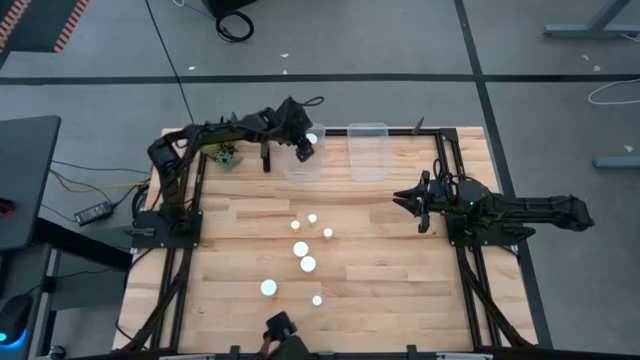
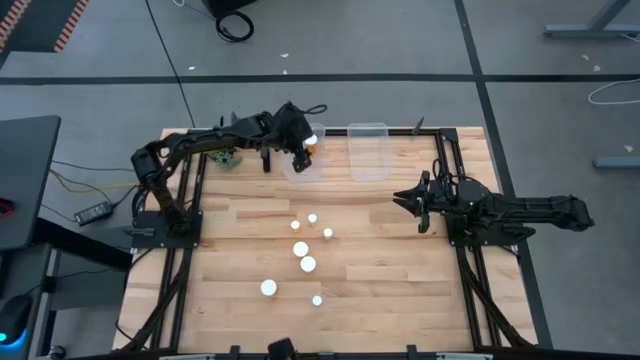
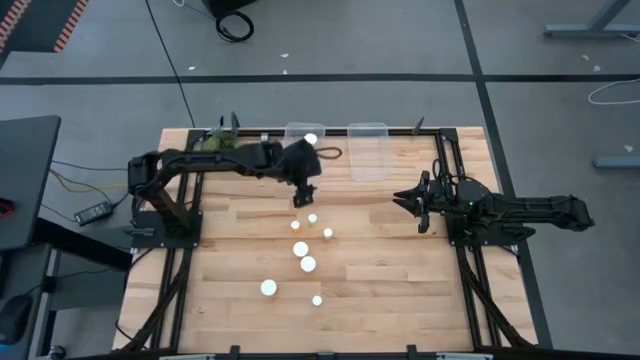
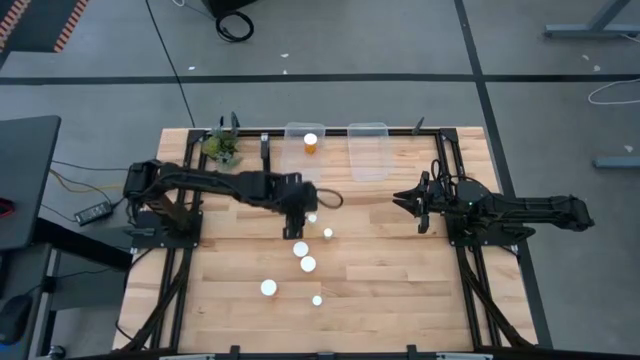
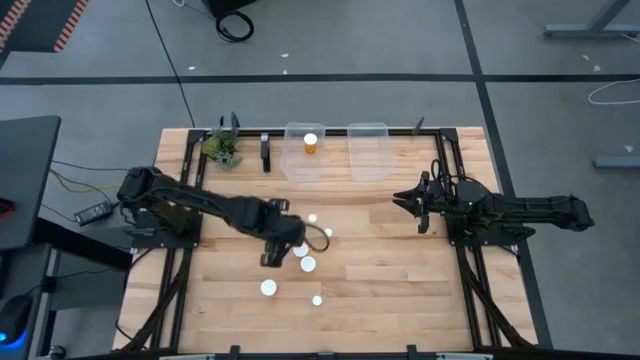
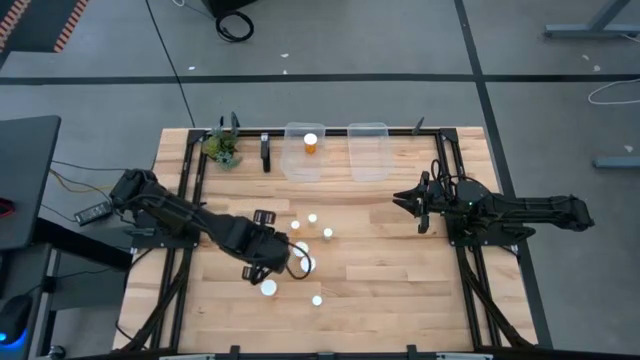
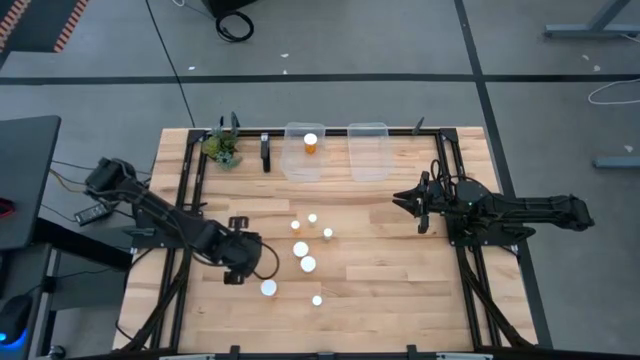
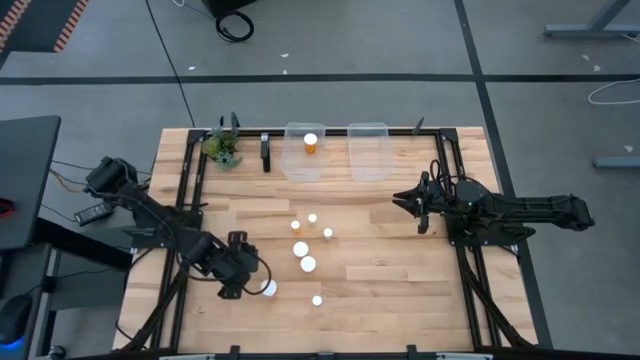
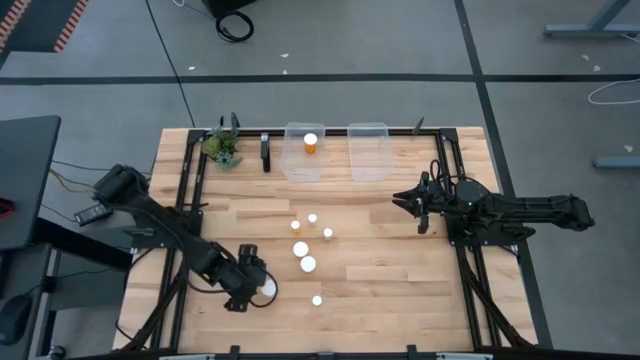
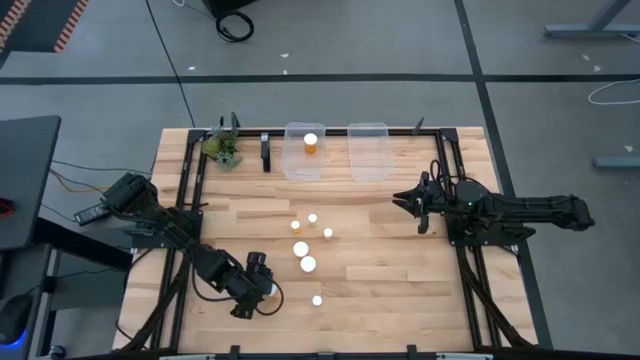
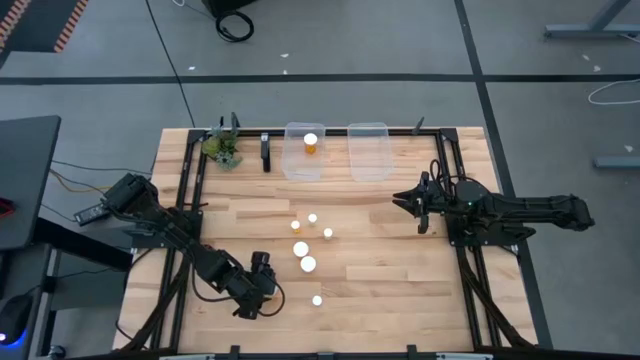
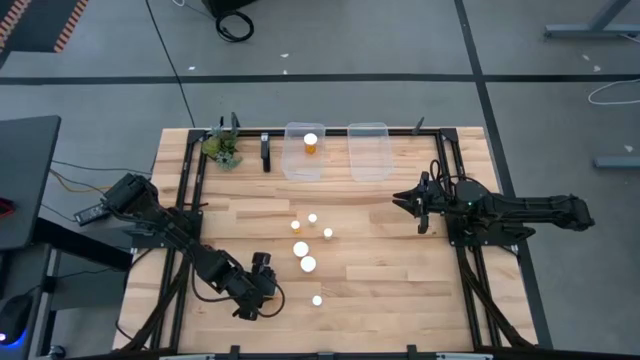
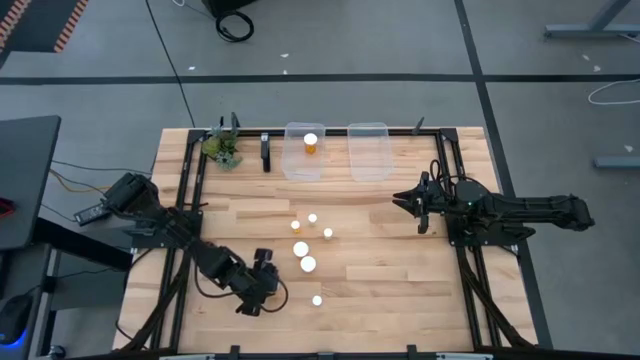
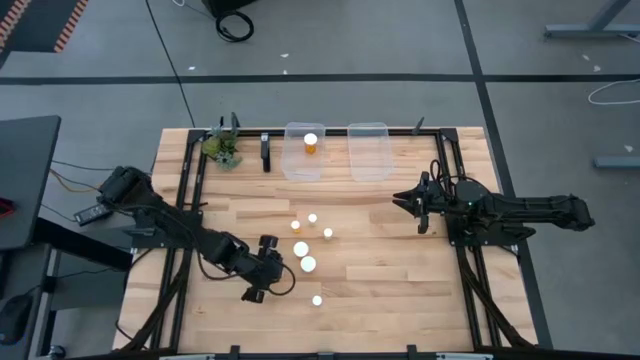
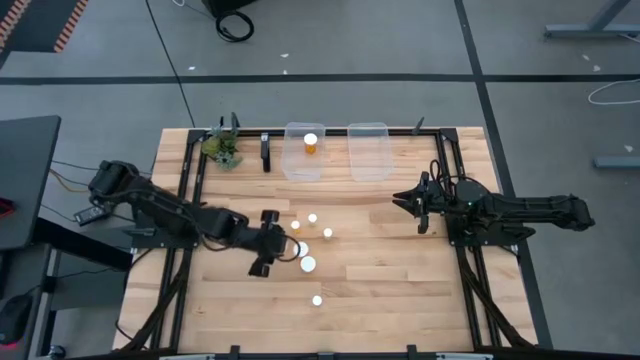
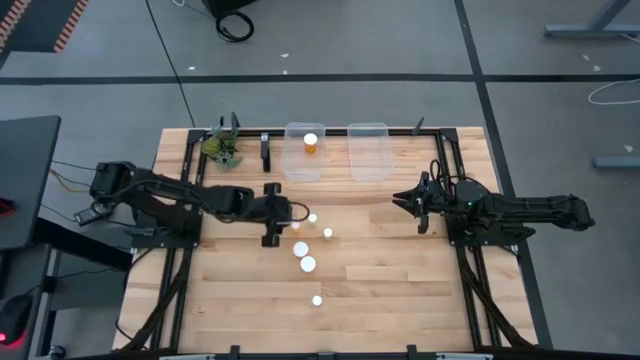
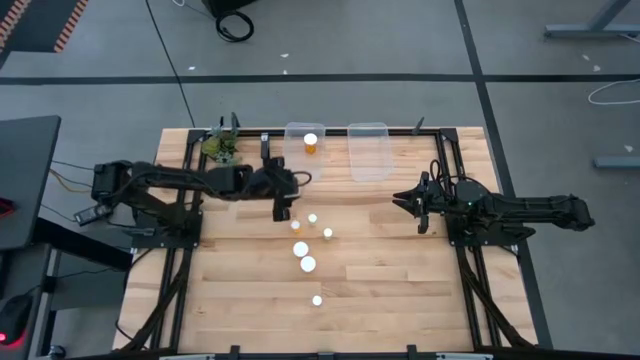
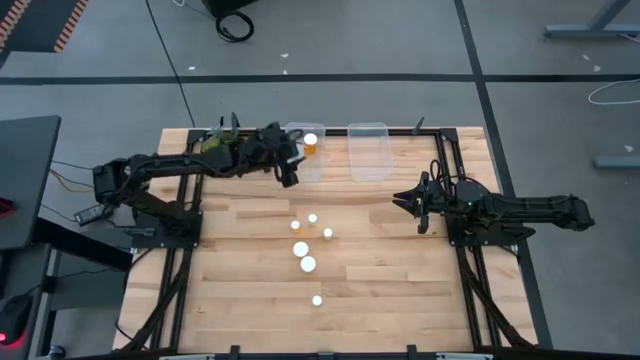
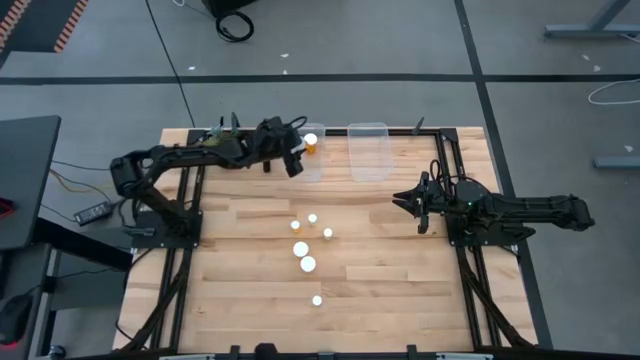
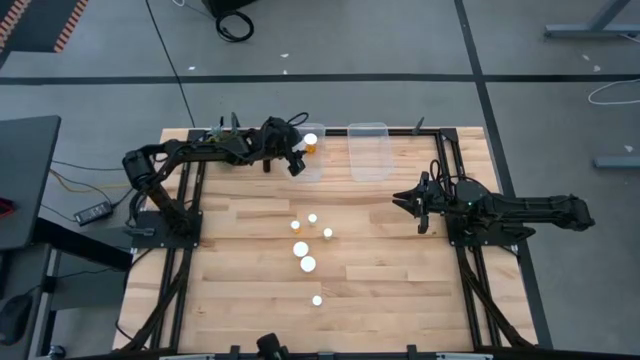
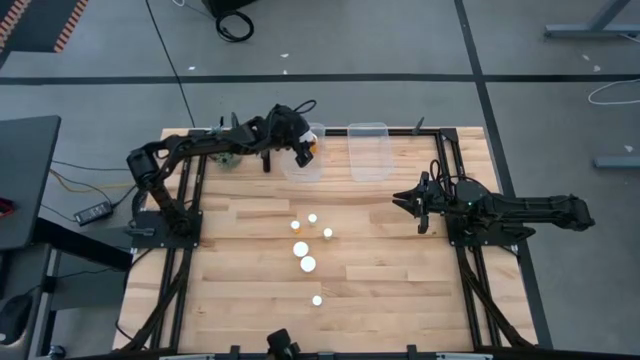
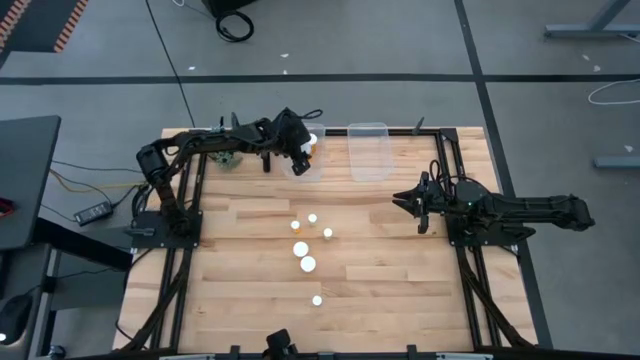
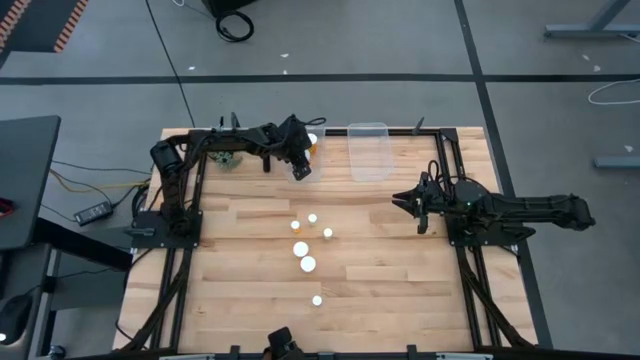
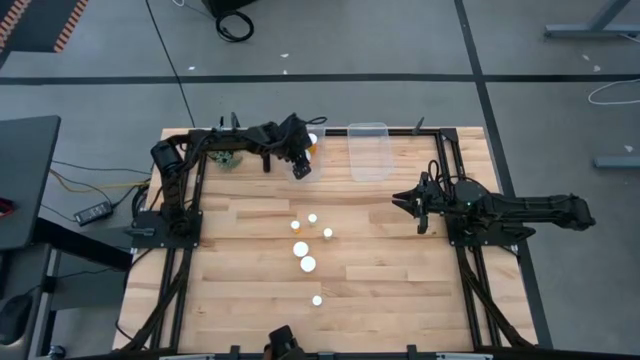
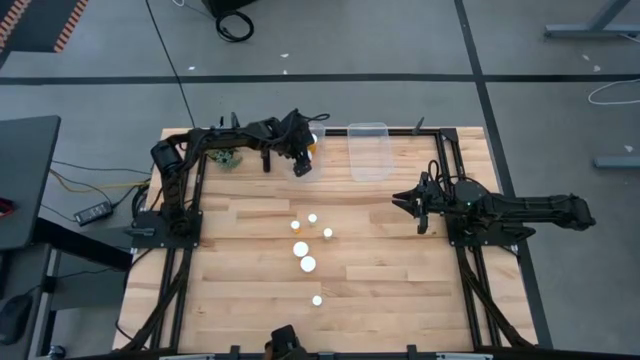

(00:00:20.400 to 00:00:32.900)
Task: Pick and place medicine bottles into bin by pill shape (circle, oval)
Put the large orange pill bottle into the left transparent bin

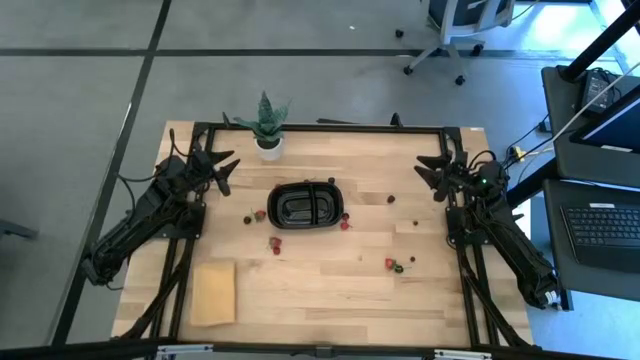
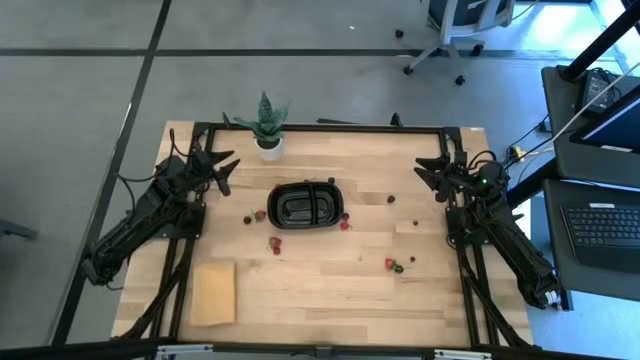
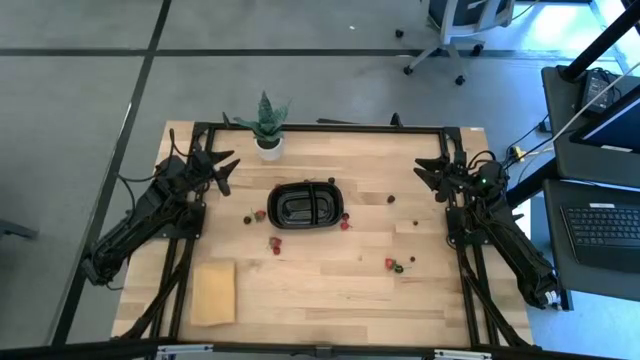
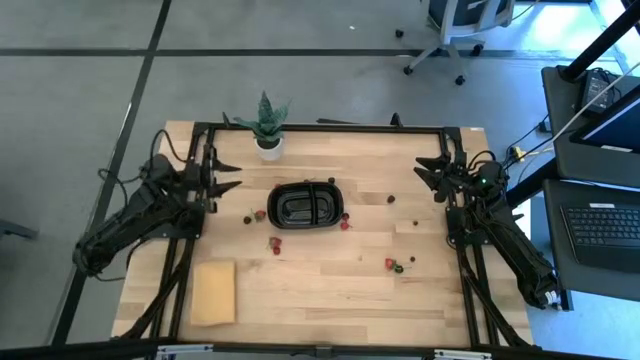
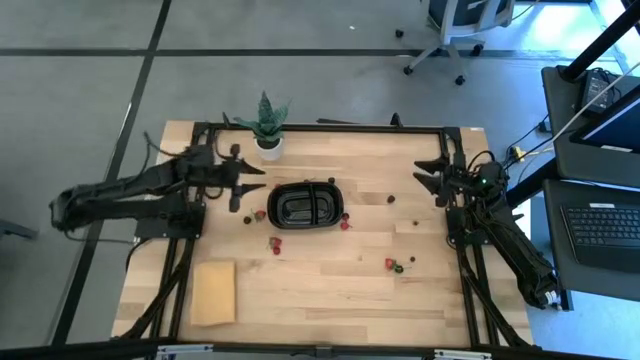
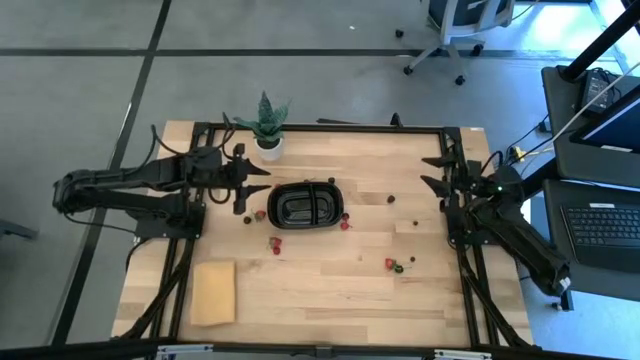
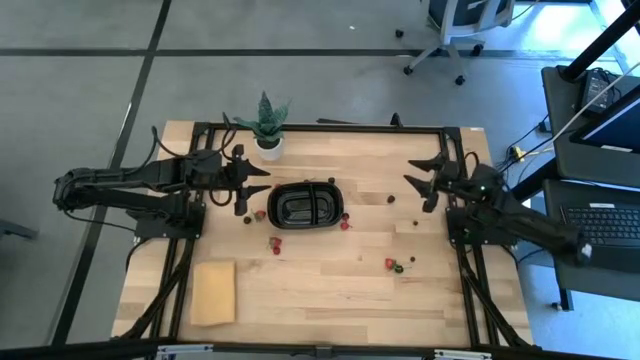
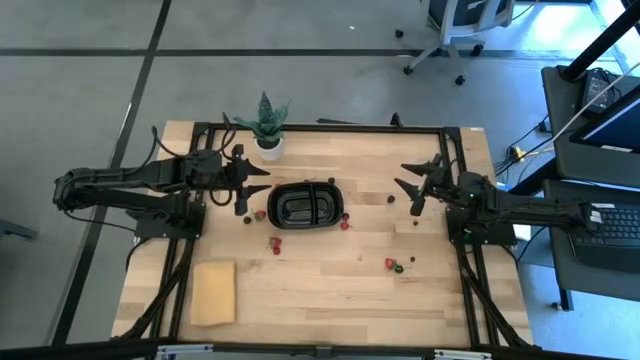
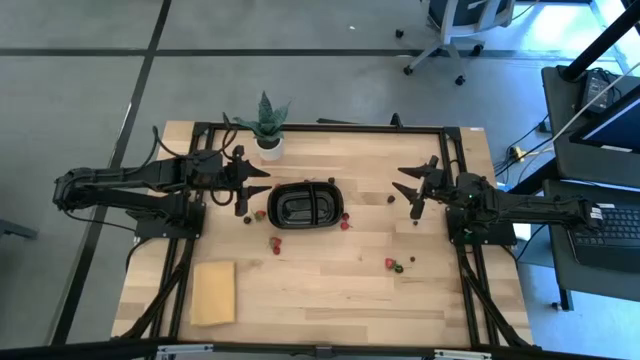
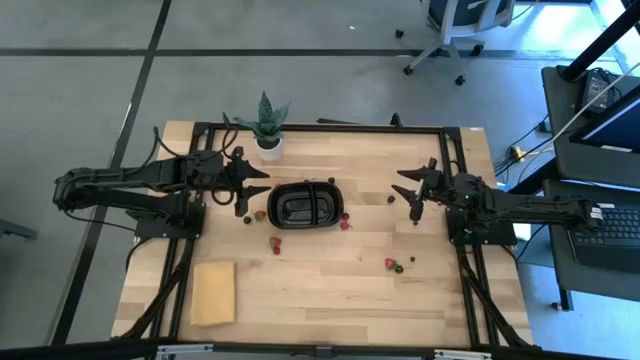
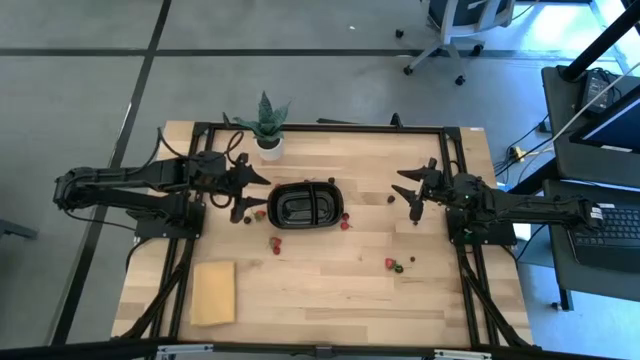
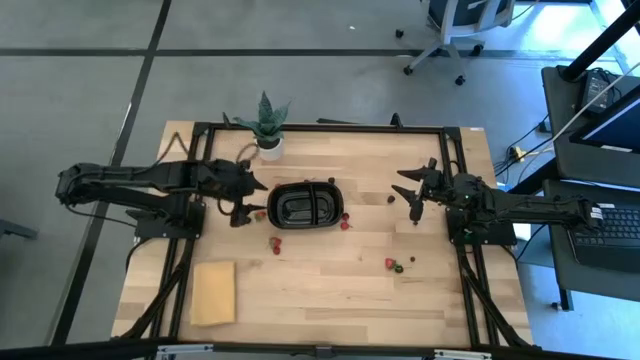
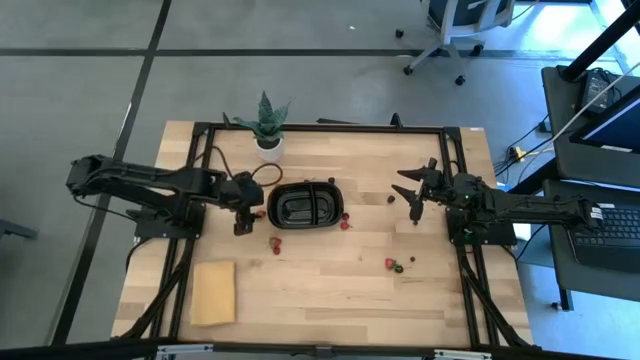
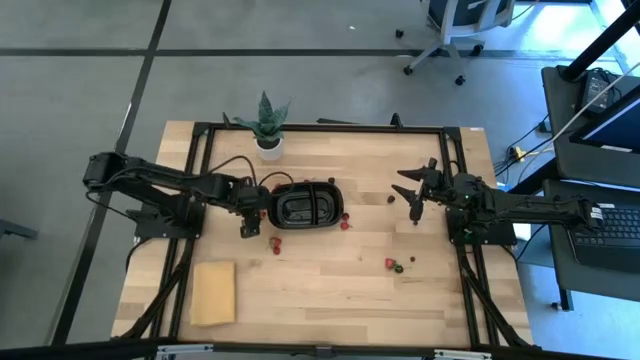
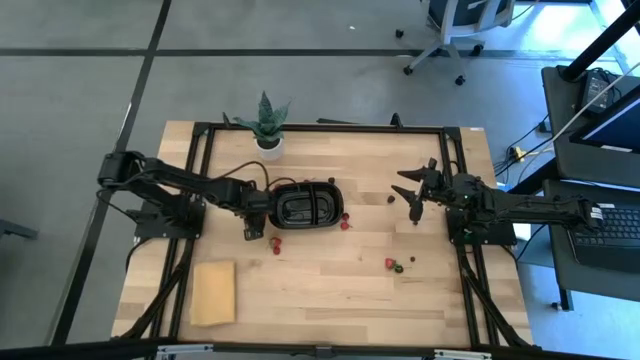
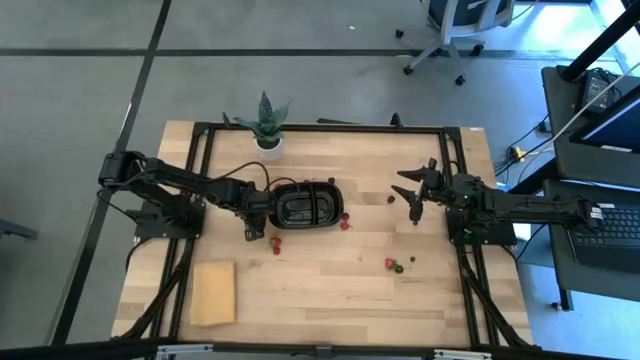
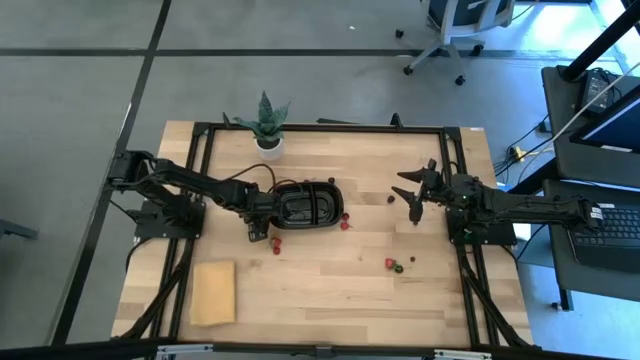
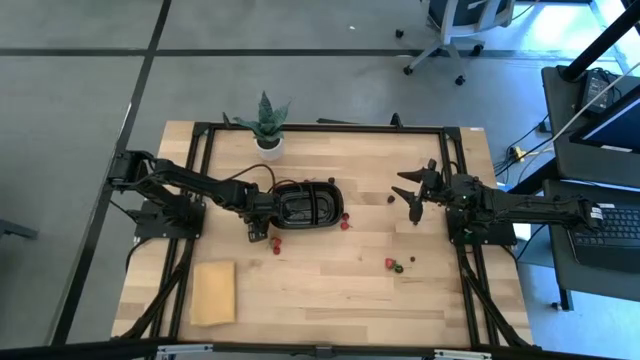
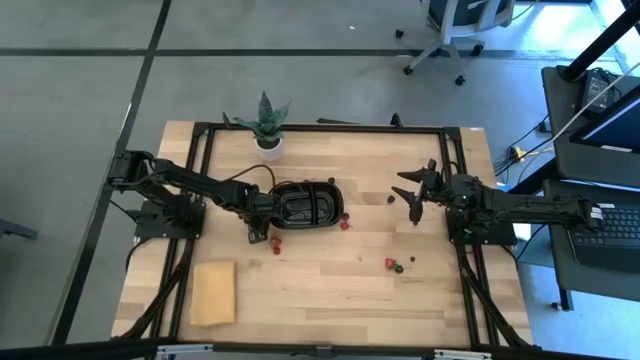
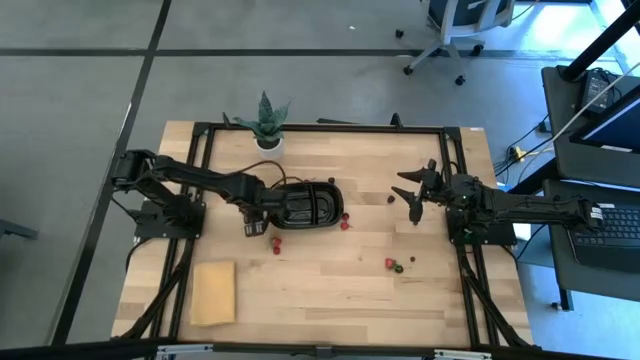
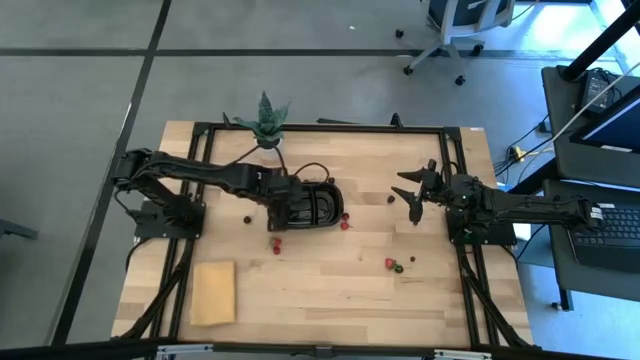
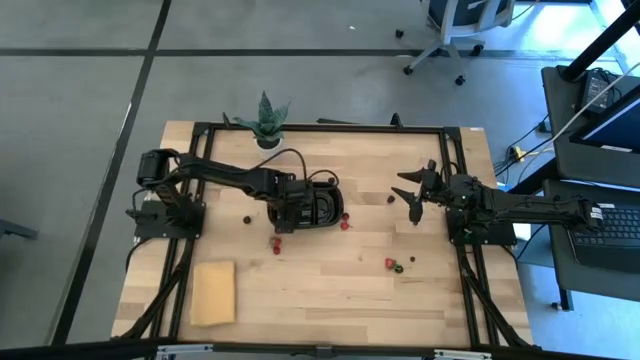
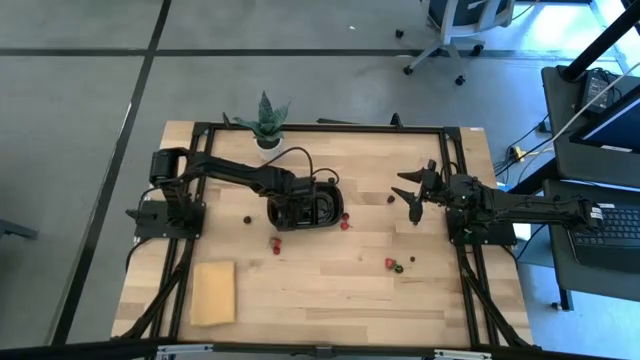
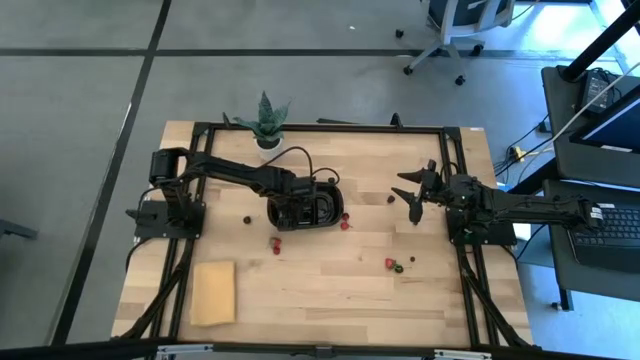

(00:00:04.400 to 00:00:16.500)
Task: Pick and placing Produce into tupperware
Put the top red strawberry into the black bin
